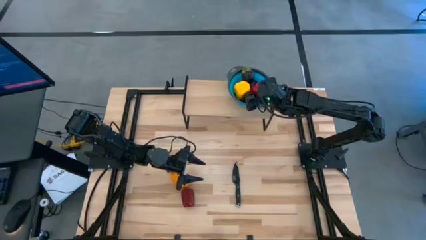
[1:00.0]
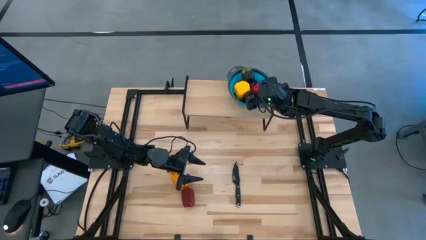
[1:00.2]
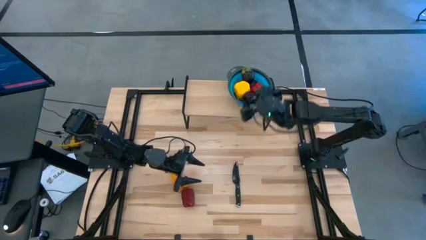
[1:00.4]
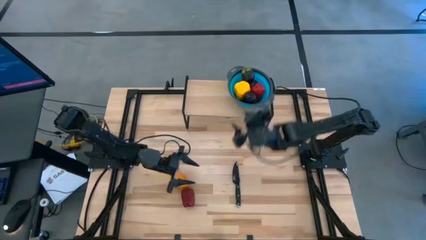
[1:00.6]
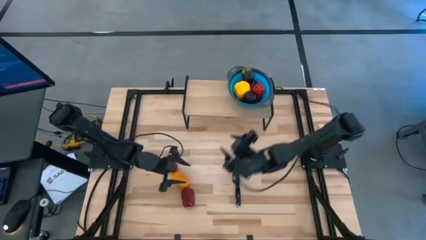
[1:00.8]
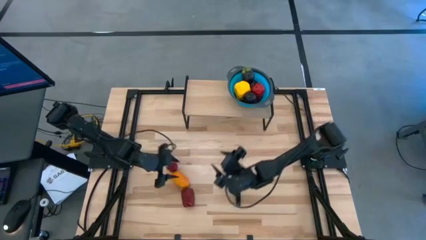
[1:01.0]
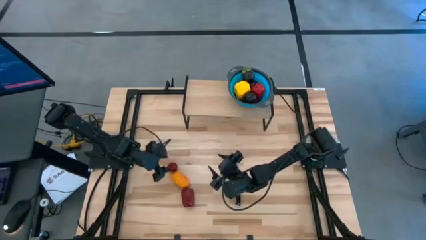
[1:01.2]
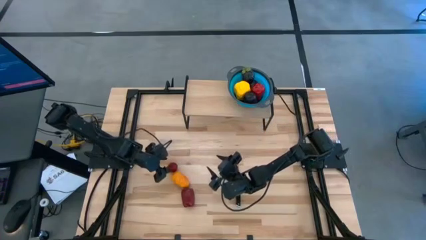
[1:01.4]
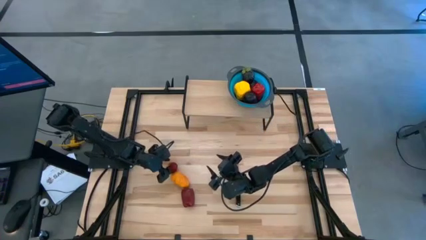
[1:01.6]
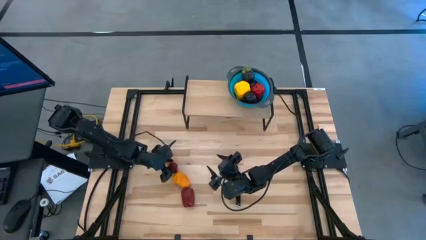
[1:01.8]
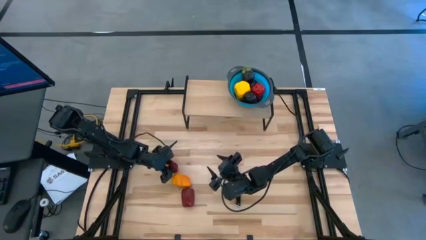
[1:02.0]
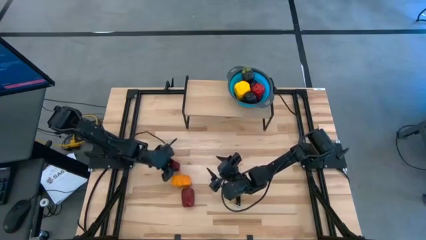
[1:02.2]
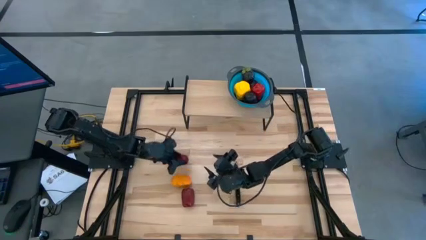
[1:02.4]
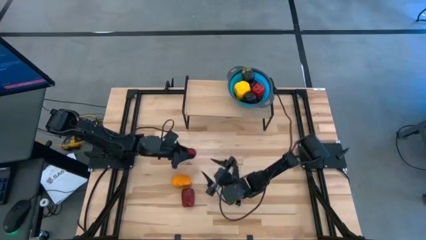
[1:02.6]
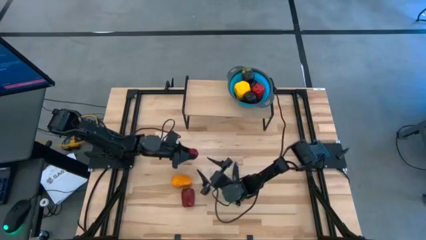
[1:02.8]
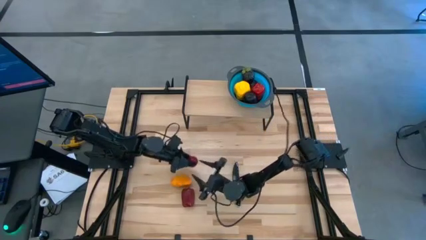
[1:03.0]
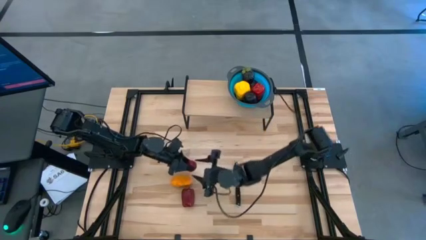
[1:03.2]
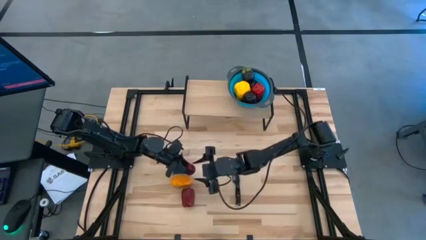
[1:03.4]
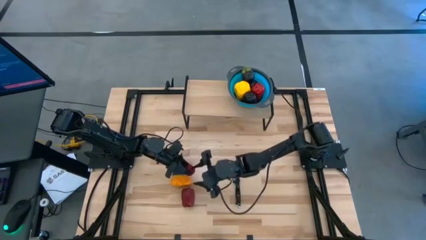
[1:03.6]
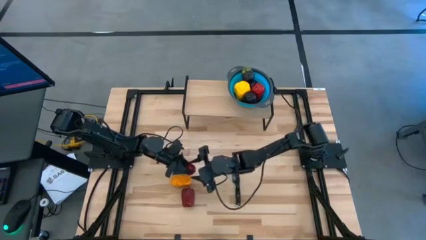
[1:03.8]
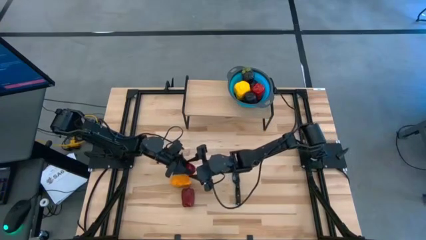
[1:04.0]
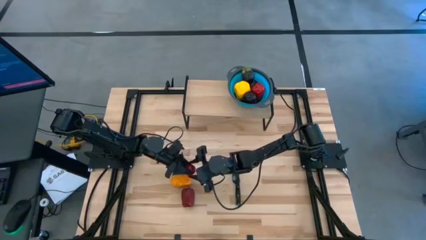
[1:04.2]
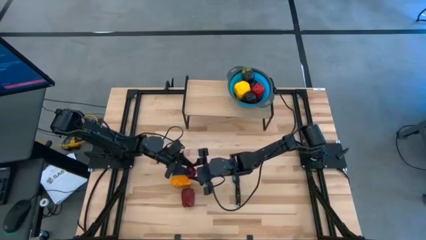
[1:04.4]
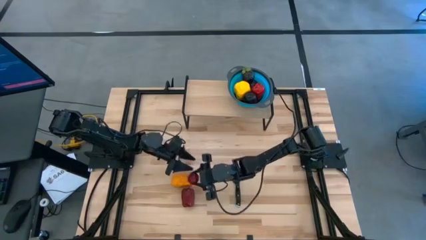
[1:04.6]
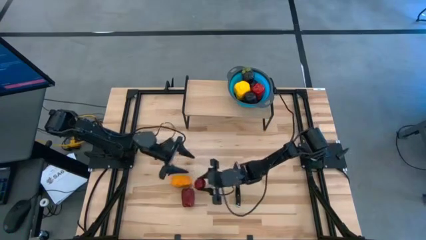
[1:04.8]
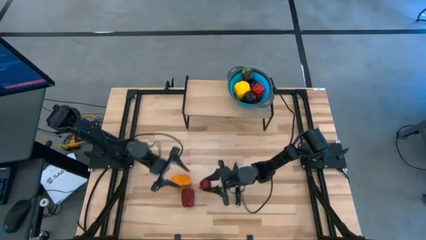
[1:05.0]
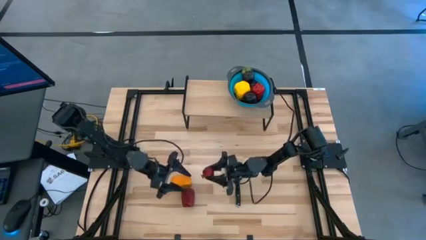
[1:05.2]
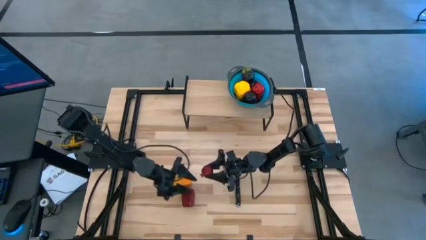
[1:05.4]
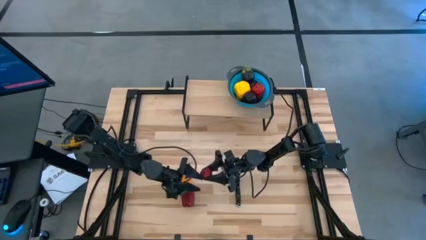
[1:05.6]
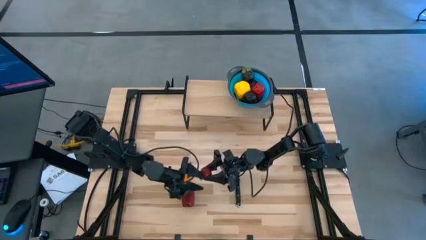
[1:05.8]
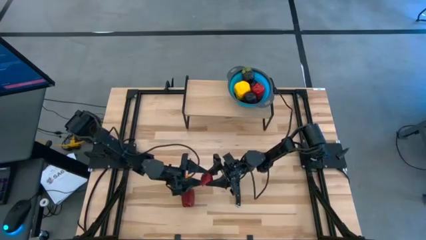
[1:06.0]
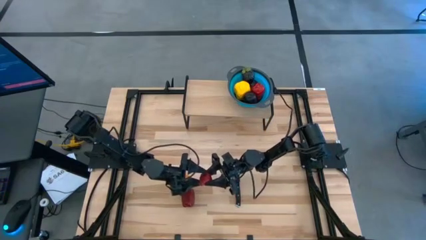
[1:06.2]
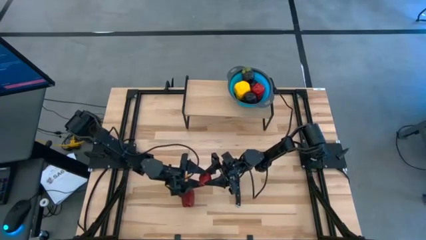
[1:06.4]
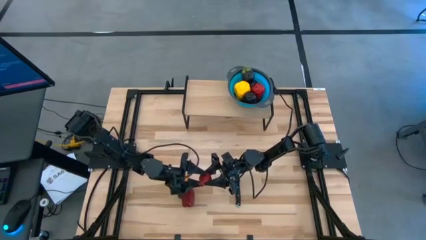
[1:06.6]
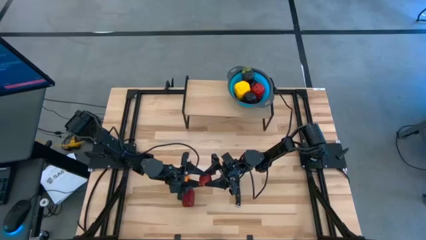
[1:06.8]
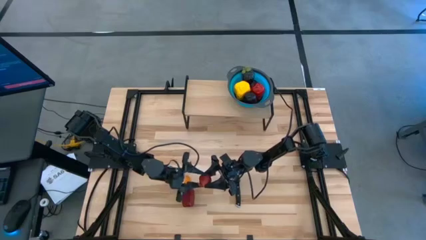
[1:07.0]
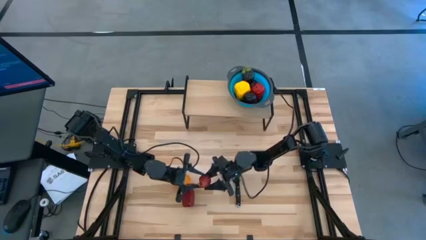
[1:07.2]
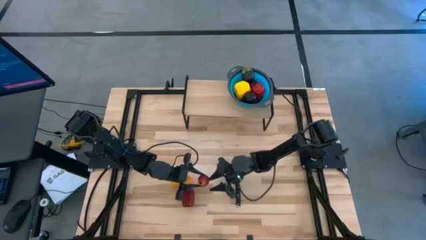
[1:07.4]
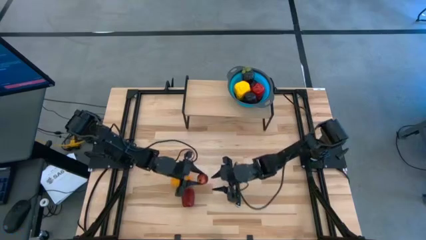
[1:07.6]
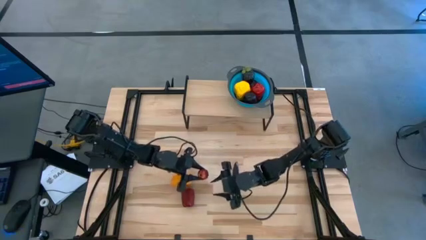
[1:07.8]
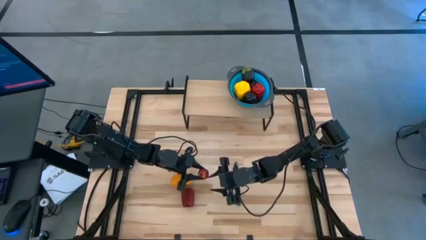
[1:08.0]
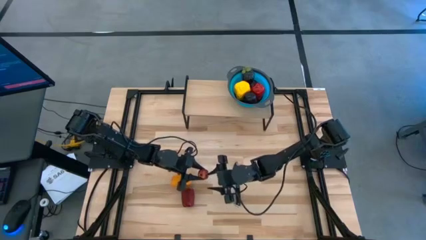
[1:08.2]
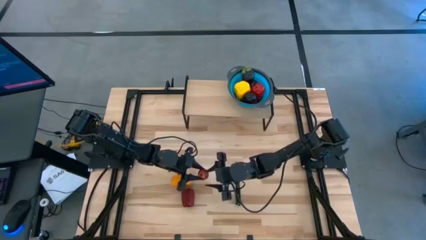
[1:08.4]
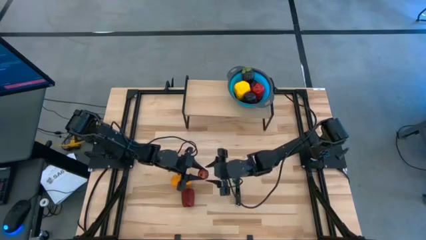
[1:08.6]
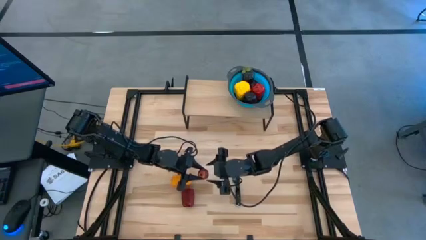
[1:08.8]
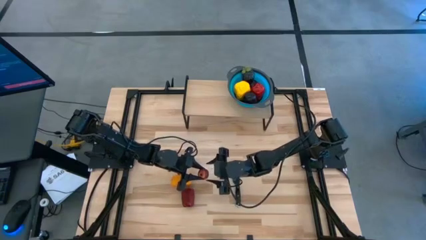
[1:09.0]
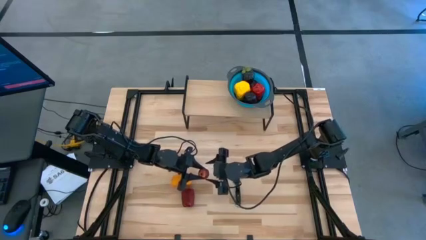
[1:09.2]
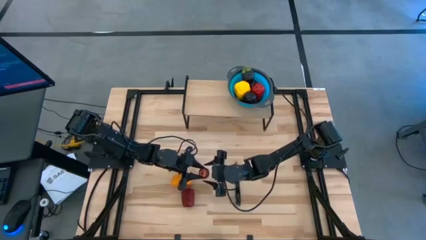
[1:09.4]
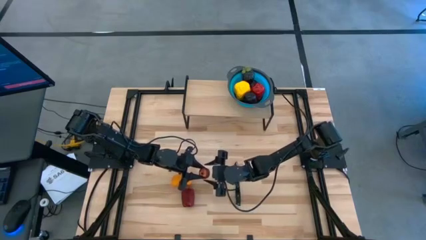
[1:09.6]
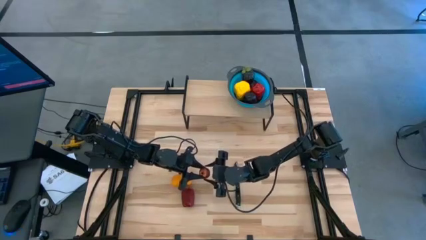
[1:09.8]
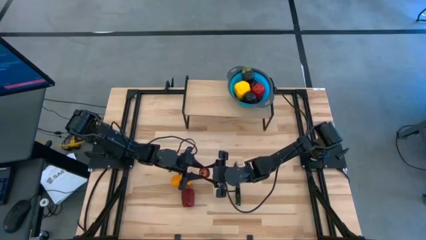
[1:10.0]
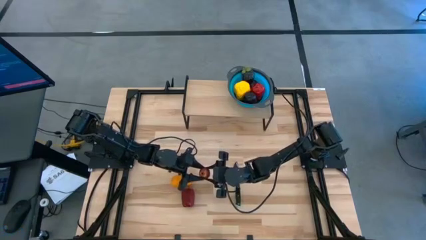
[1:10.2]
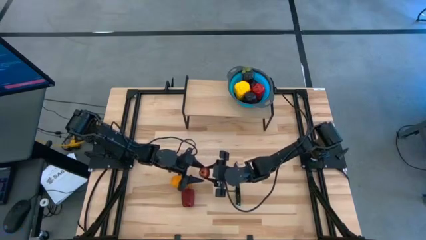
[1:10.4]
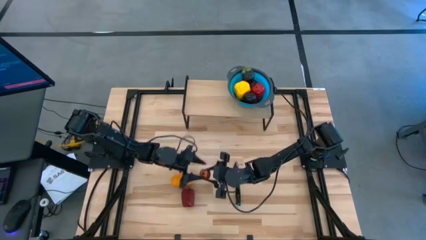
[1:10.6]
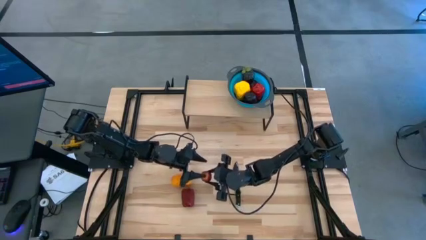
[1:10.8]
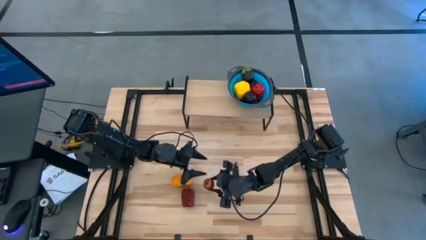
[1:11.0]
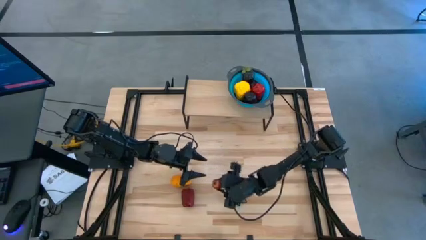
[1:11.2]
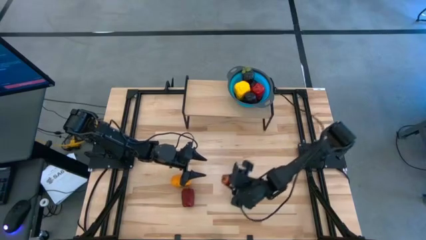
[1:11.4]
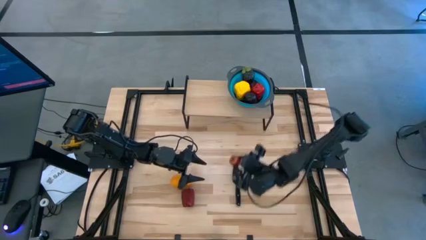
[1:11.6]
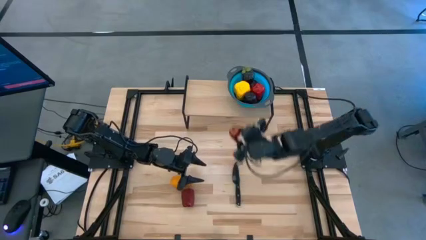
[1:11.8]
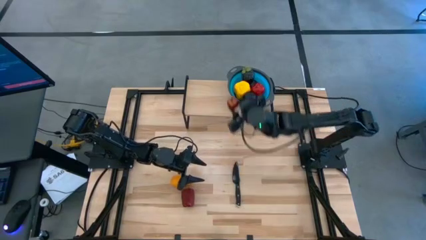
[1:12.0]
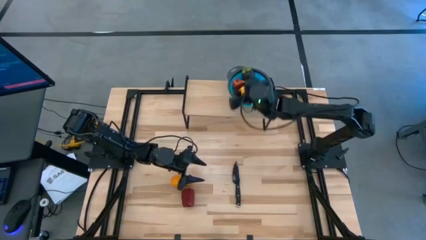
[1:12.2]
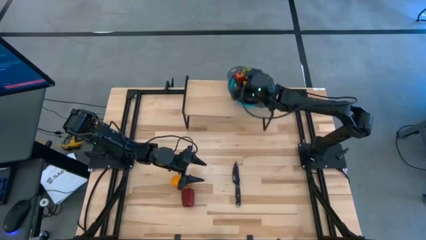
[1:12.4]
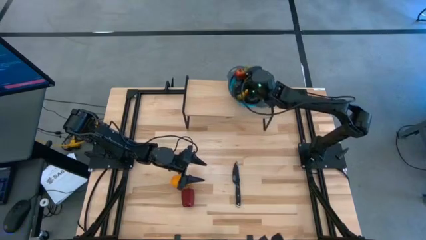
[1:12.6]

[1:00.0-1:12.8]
Task: Pick & Place Fruit
Put the red pomegranate into the blue strainer bowl on the shelf

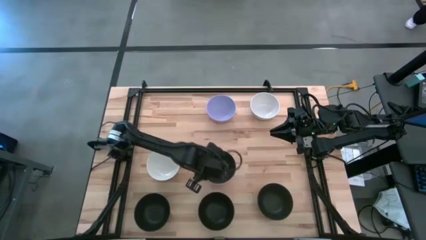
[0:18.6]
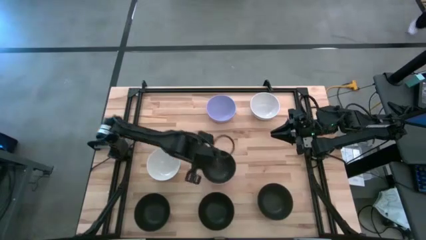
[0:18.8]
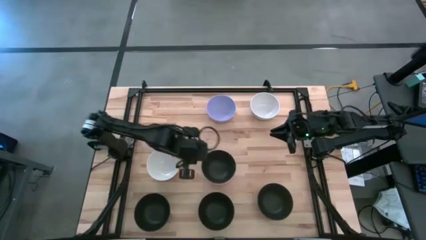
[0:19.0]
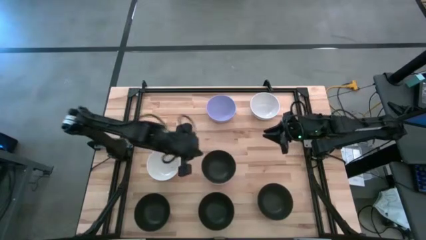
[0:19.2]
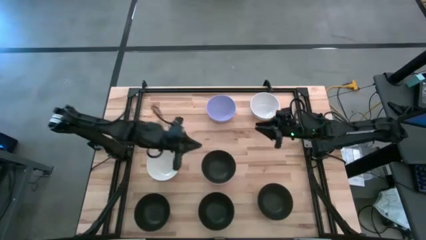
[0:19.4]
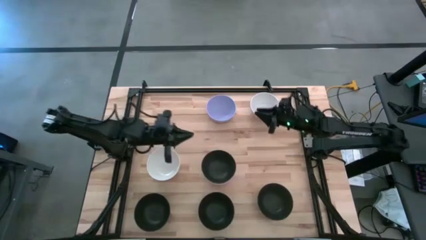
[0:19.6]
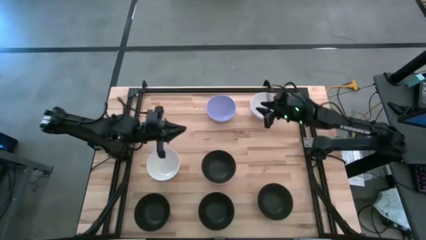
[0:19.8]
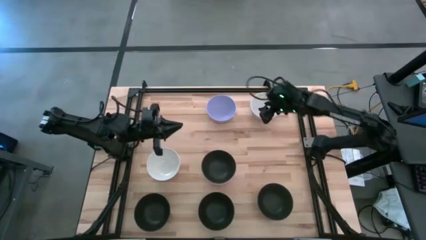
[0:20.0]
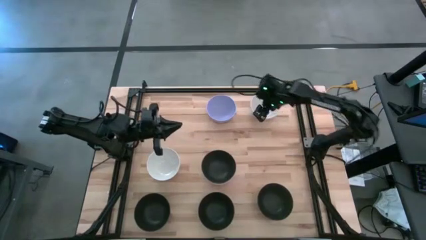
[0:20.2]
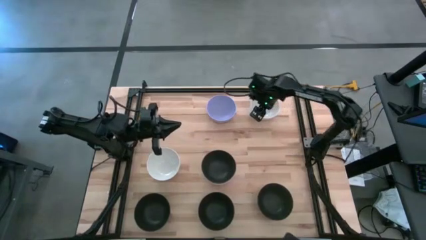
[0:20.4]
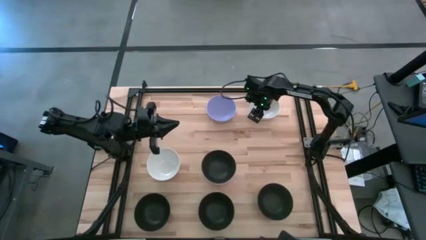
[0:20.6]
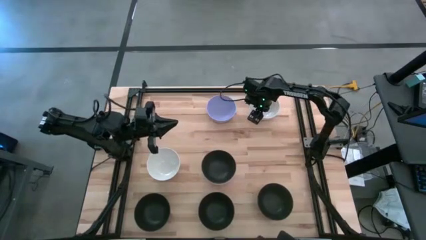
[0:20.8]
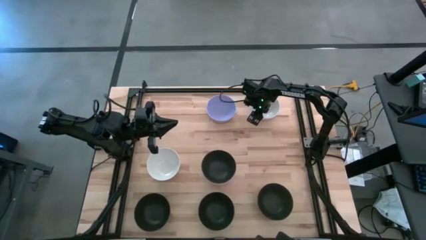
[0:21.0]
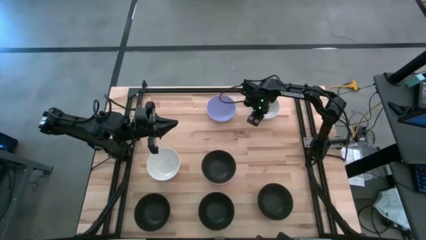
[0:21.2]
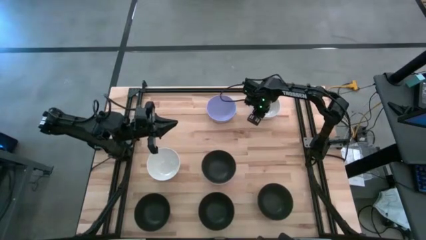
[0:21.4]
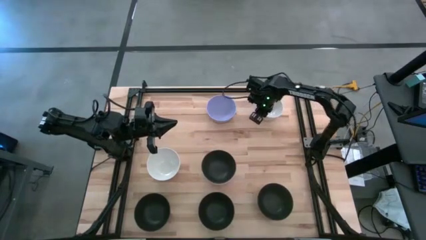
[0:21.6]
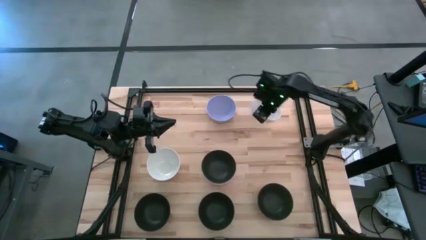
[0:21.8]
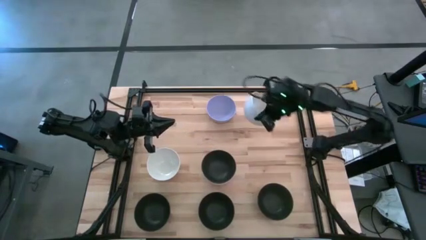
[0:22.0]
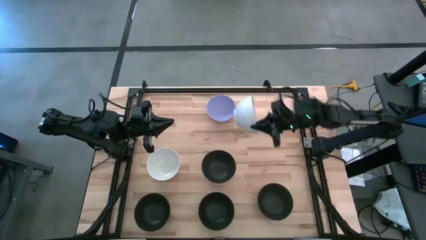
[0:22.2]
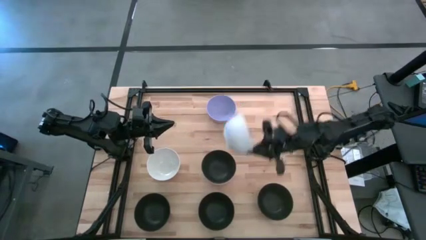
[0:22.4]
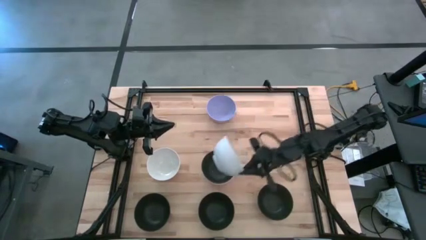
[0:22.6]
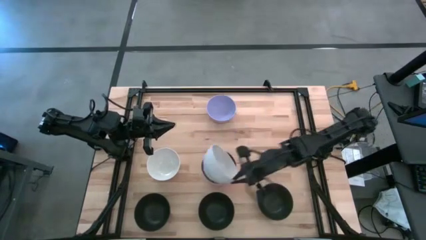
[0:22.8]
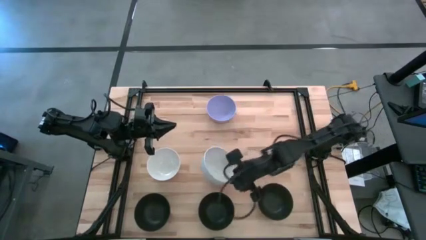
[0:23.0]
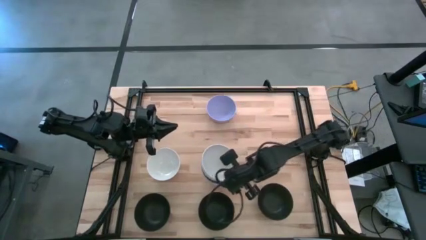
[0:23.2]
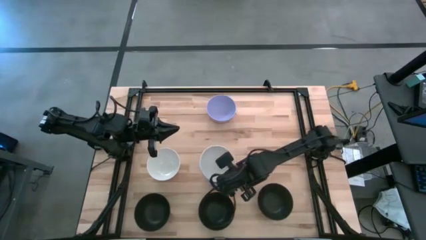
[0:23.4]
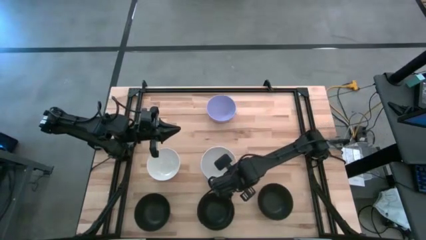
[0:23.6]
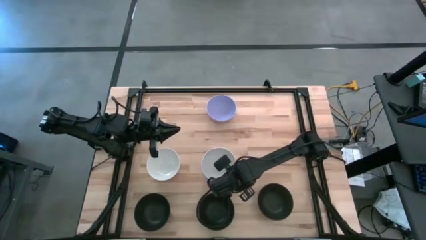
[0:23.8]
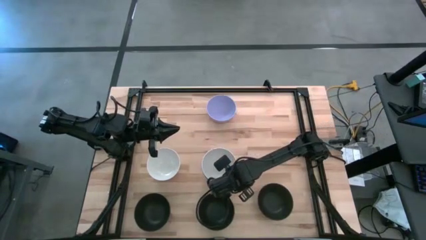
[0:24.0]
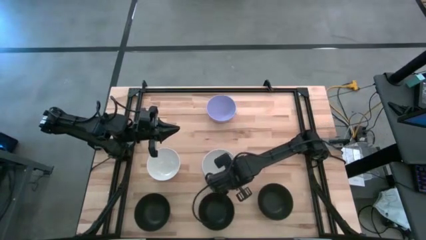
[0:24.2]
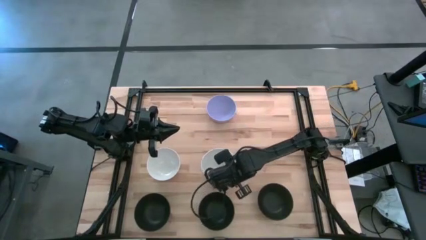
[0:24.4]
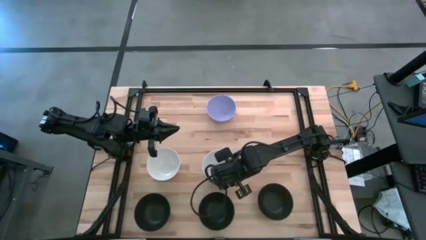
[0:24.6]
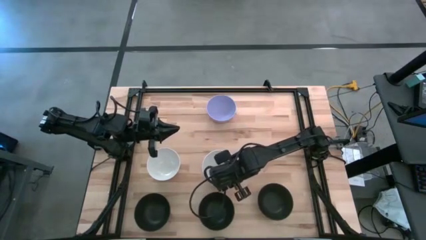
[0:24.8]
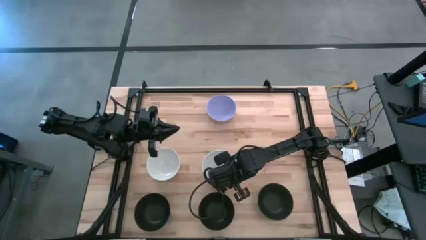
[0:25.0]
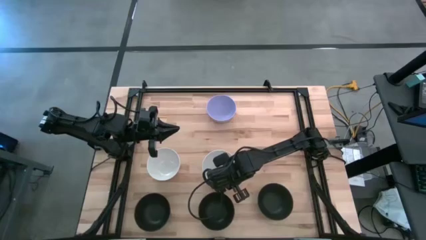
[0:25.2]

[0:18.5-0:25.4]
Task: Nest bowls inside each other
Stack the top right white bowl on top of the top black bowl
